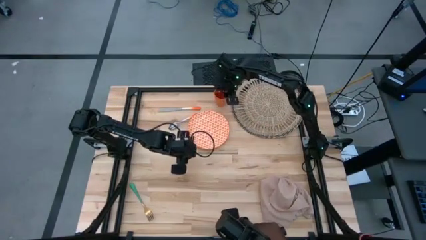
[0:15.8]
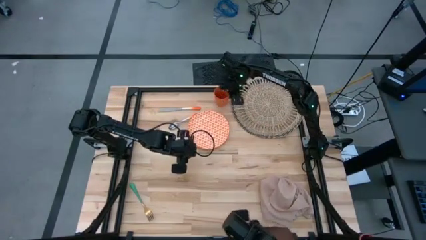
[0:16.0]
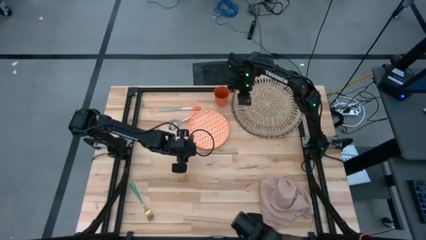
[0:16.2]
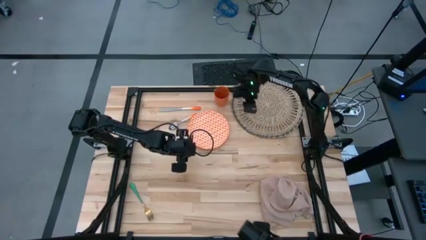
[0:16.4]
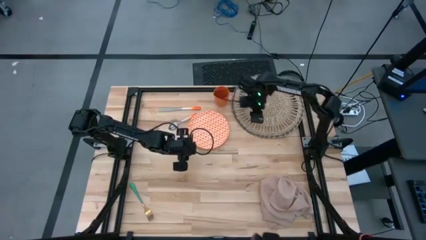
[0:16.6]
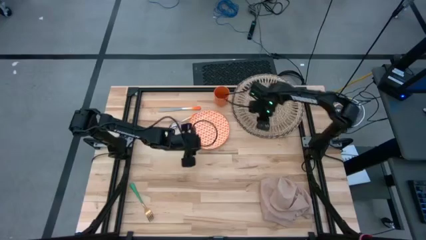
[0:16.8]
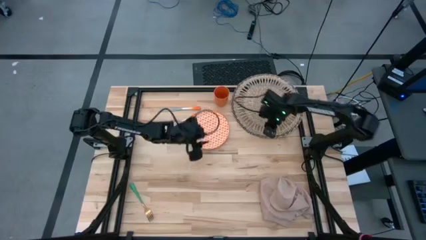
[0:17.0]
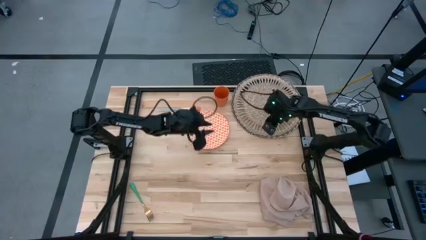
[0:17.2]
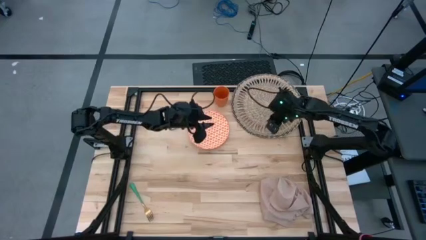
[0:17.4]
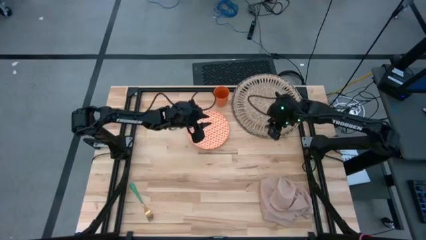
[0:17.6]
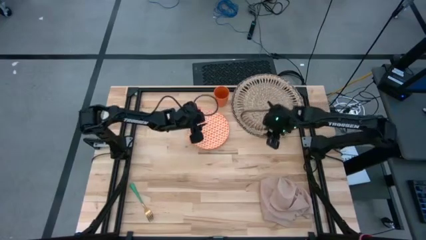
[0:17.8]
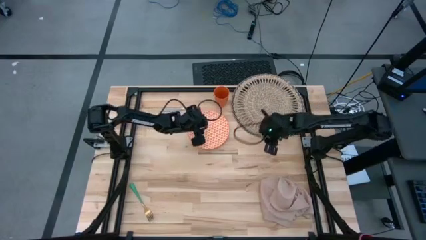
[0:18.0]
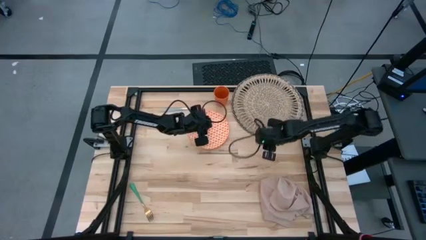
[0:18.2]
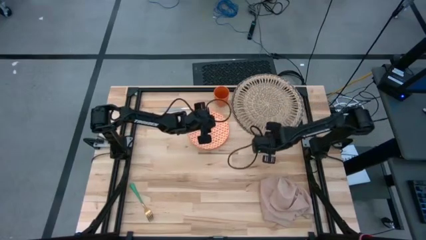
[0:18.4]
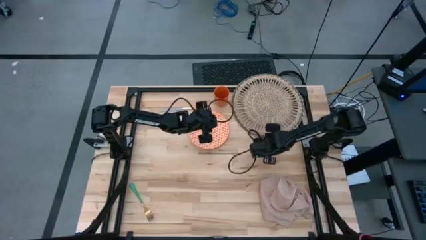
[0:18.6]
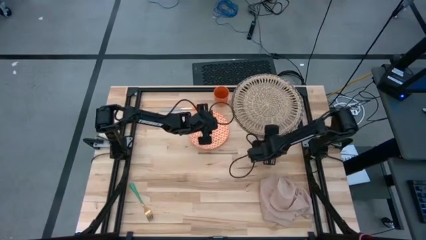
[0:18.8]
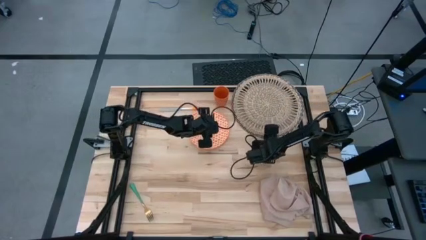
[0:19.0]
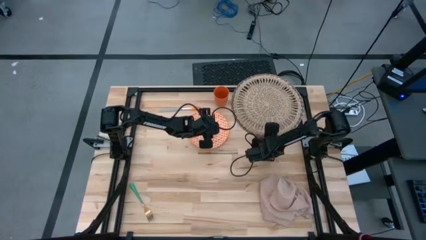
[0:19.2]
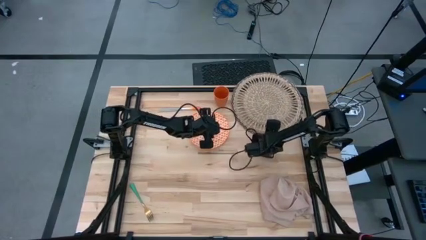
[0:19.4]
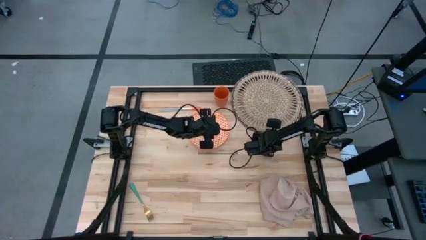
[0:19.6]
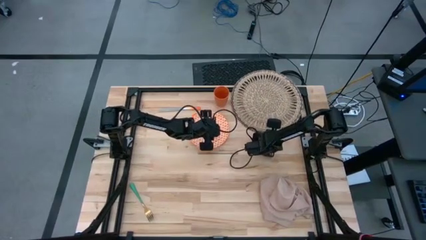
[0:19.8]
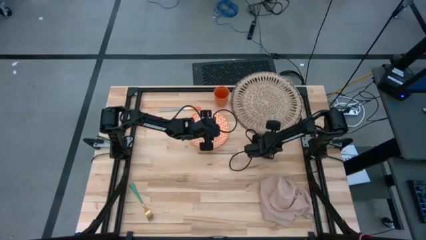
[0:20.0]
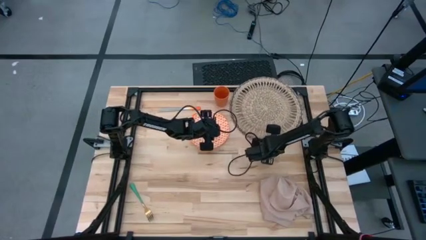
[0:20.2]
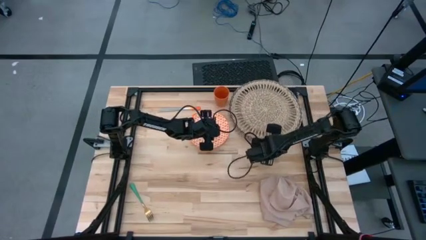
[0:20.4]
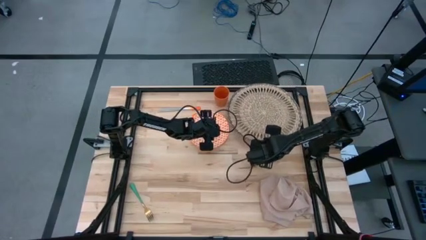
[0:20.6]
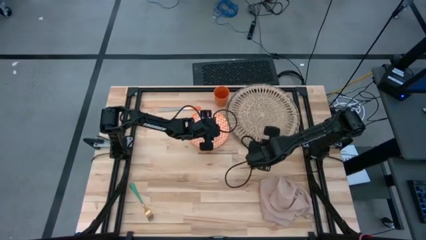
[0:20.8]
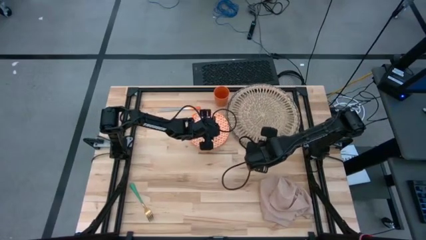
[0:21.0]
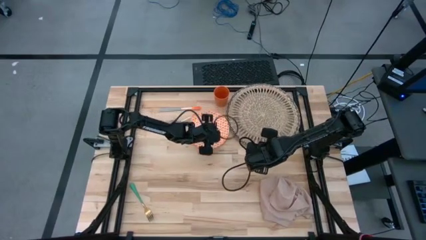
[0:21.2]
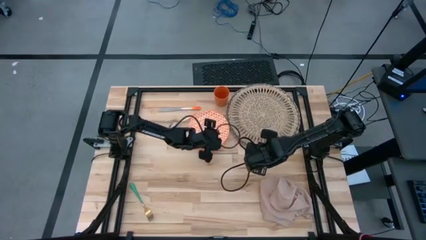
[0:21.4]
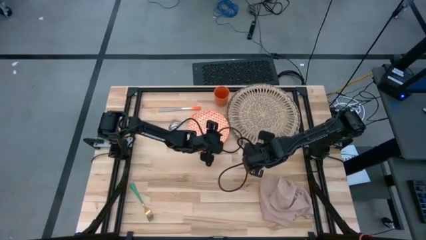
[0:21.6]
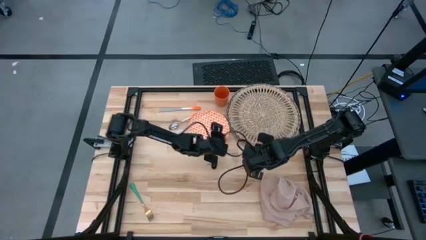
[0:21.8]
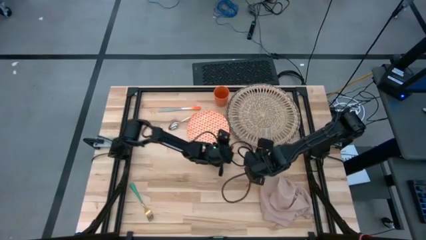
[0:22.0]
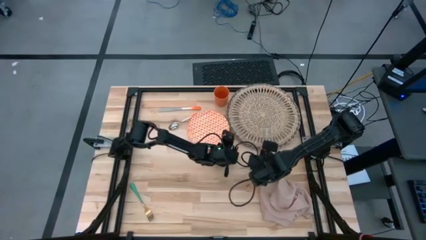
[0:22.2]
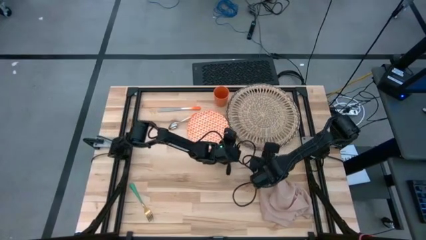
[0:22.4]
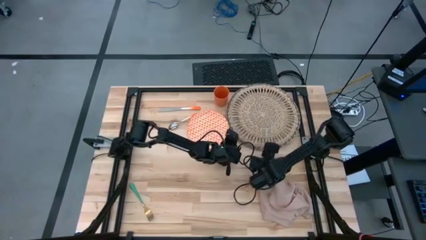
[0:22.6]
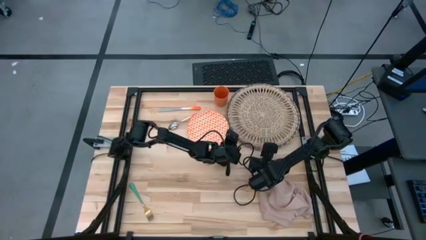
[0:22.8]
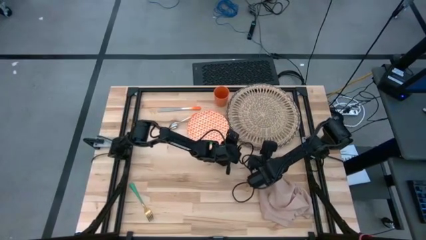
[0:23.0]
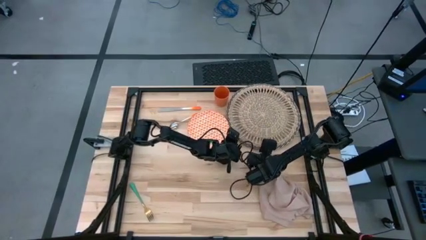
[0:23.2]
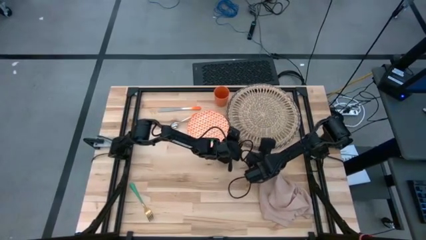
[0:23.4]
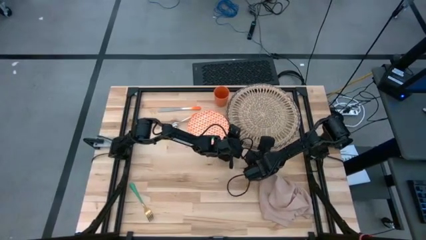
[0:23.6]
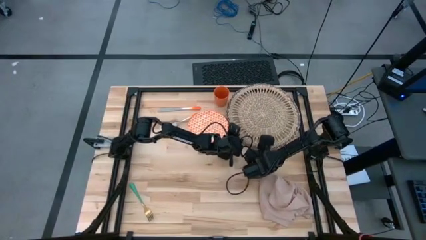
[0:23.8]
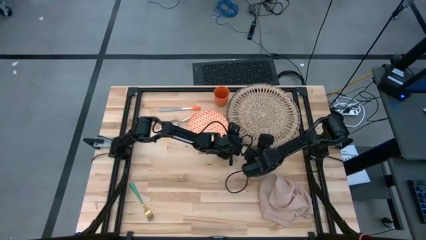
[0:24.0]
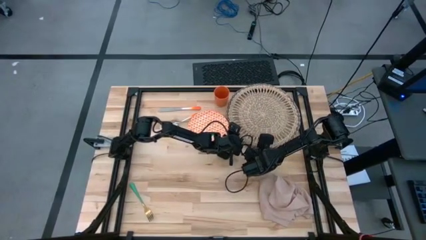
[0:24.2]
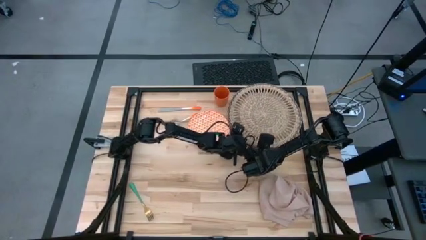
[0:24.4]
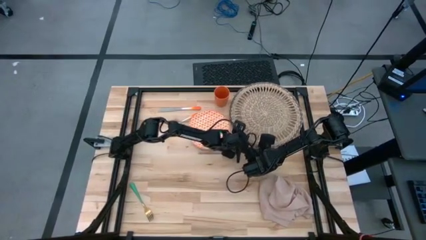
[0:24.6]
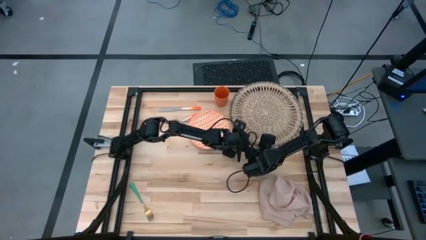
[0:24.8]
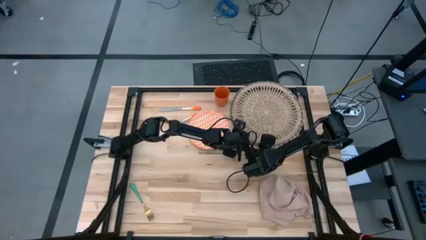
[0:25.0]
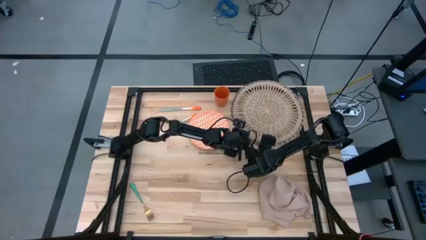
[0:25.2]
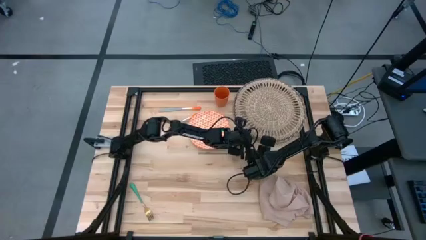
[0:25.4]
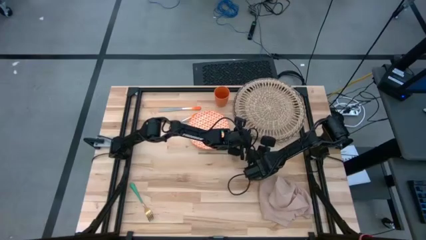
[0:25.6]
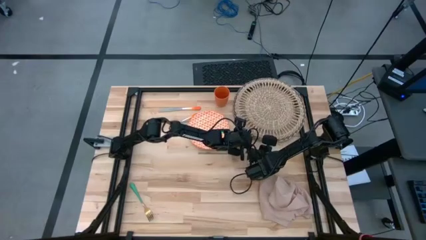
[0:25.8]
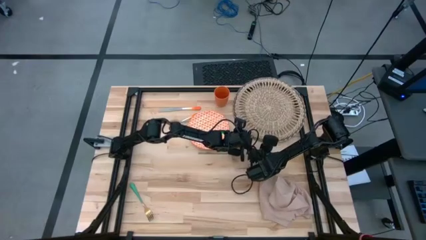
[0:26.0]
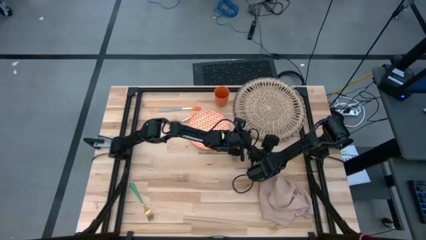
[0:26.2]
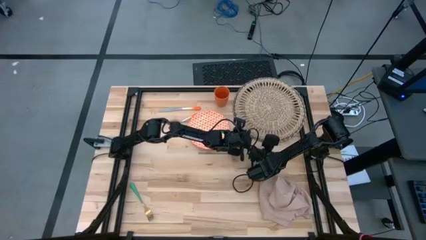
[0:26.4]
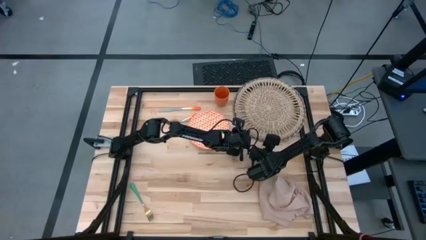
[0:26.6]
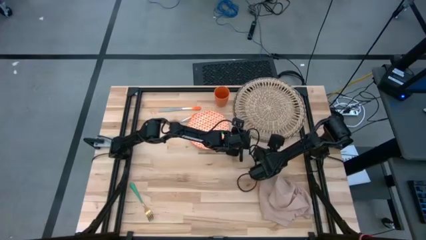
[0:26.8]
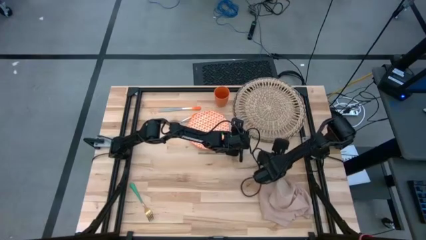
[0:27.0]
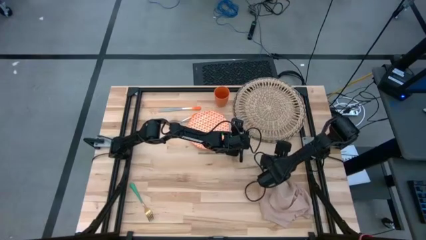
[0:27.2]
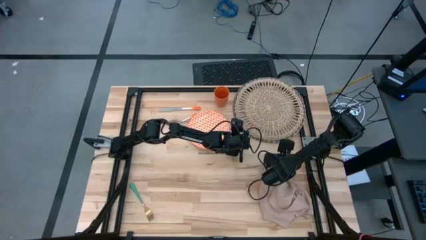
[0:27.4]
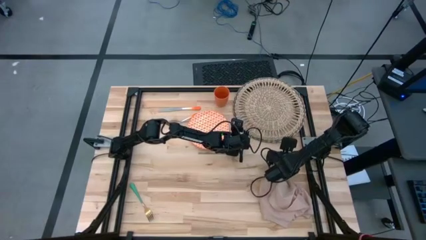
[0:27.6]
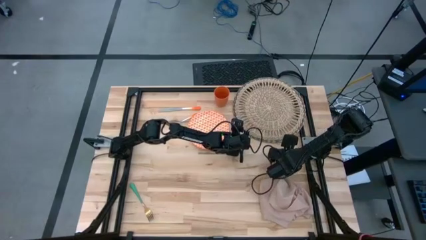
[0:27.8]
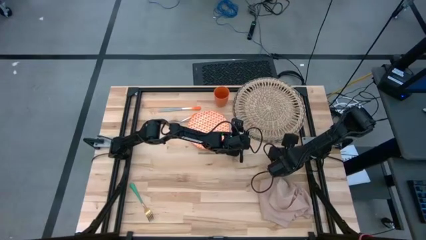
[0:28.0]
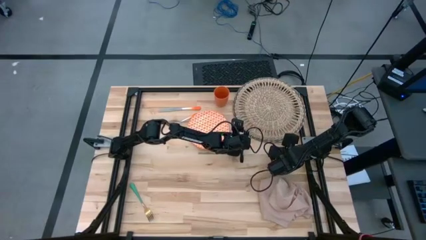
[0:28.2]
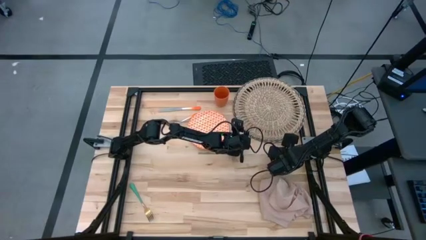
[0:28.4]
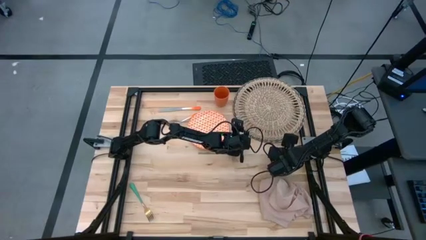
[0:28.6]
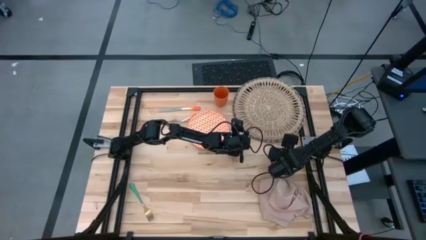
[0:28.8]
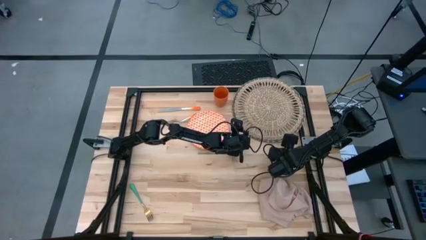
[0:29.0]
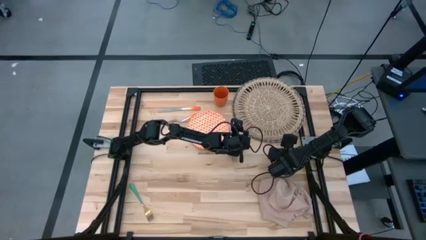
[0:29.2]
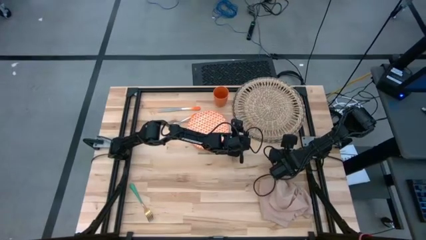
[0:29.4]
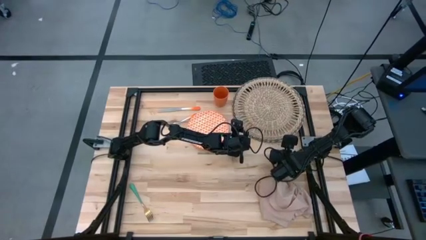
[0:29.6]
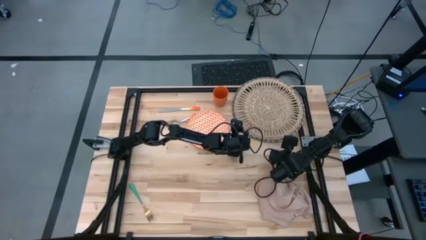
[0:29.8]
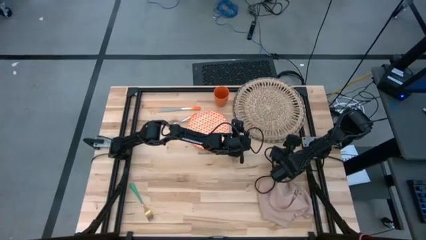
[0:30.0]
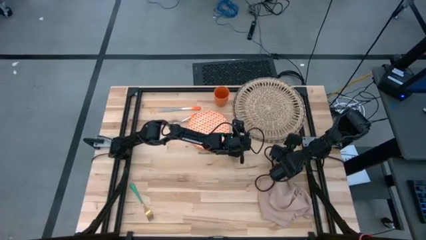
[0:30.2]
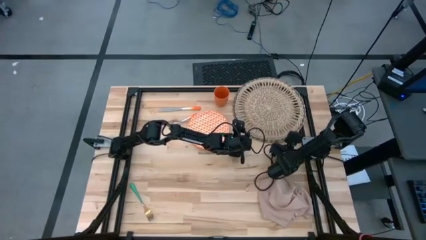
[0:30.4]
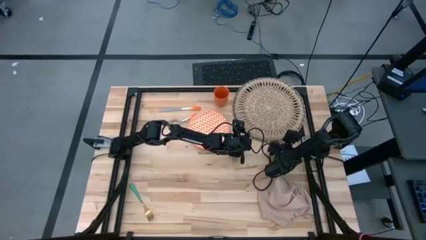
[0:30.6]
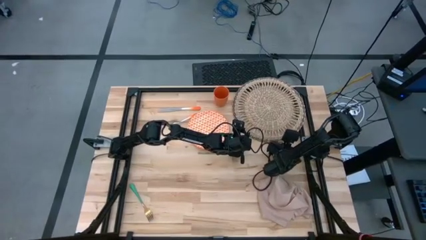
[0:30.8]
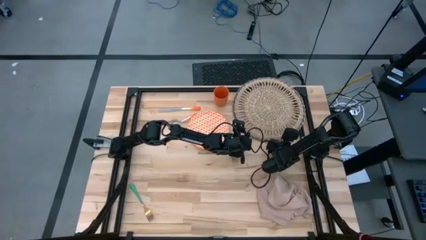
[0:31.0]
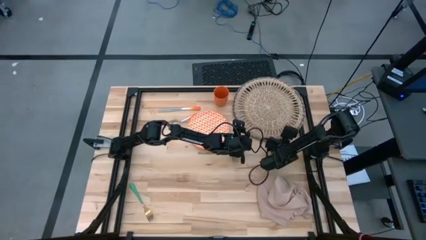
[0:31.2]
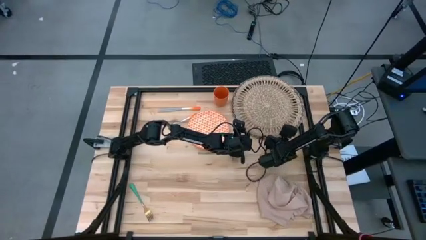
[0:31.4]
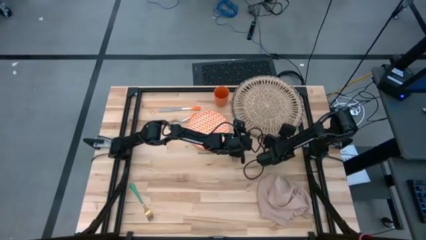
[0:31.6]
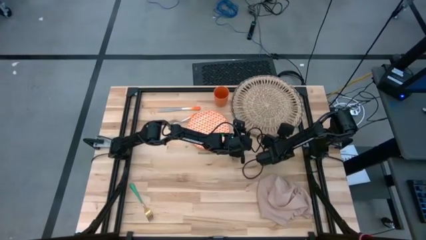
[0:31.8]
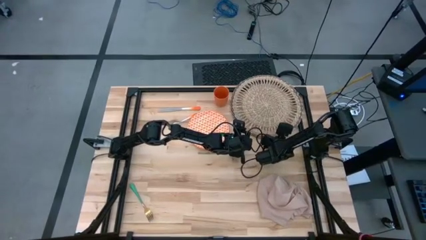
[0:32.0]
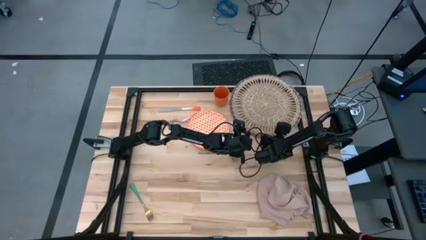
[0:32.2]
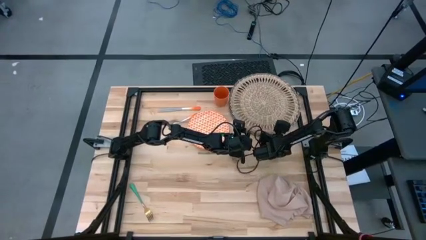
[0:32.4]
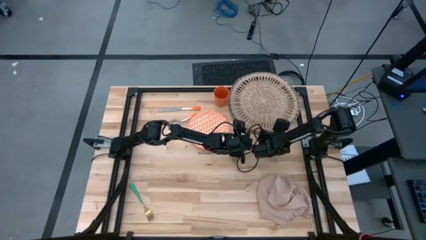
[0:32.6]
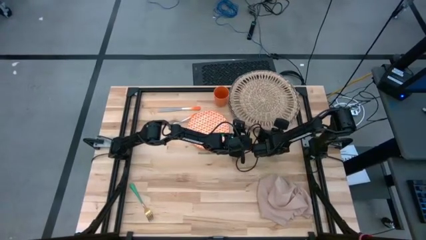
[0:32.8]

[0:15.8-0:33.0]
Task: Set table place
Move the mat to the center of the table
